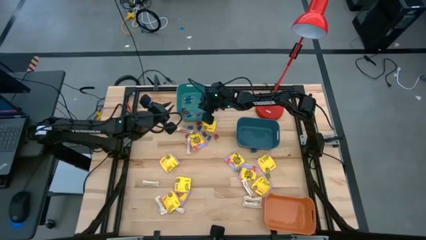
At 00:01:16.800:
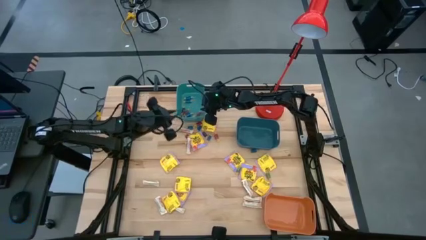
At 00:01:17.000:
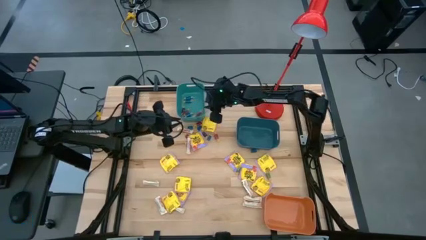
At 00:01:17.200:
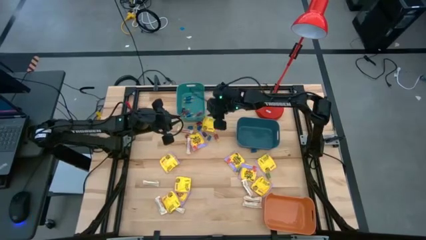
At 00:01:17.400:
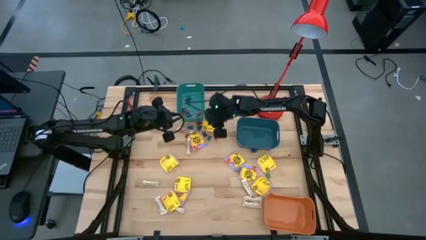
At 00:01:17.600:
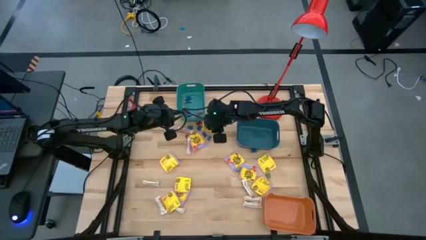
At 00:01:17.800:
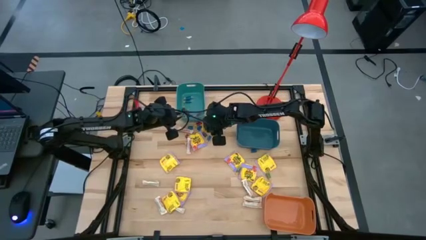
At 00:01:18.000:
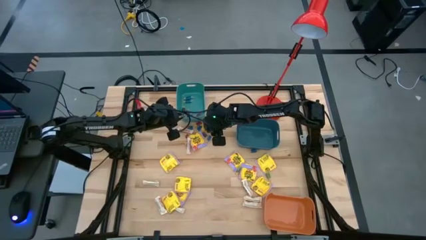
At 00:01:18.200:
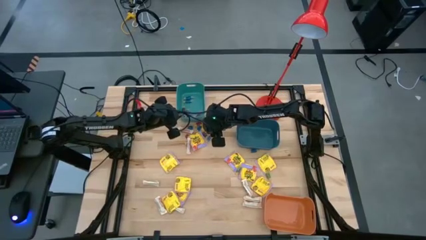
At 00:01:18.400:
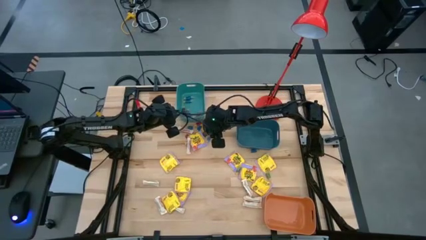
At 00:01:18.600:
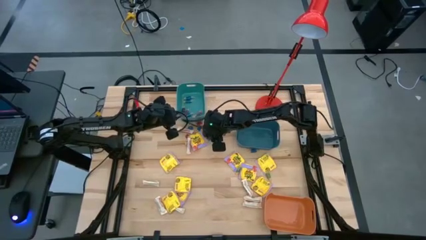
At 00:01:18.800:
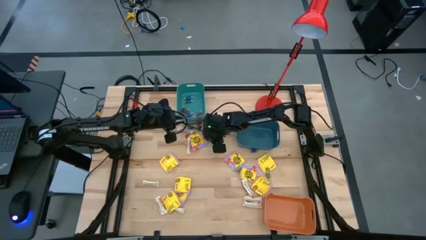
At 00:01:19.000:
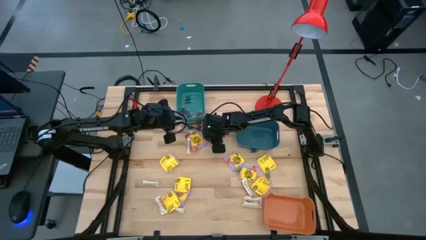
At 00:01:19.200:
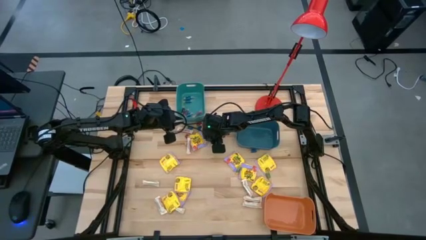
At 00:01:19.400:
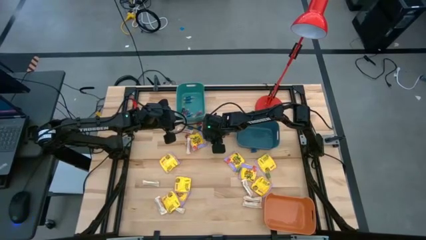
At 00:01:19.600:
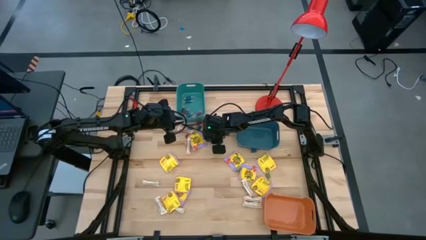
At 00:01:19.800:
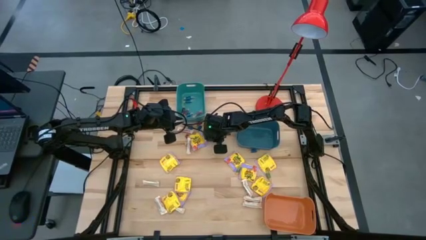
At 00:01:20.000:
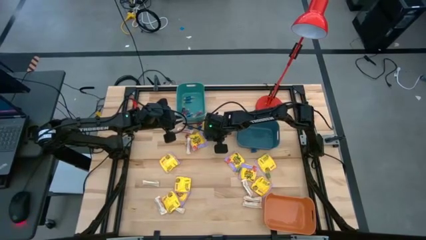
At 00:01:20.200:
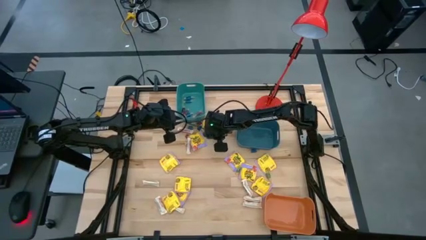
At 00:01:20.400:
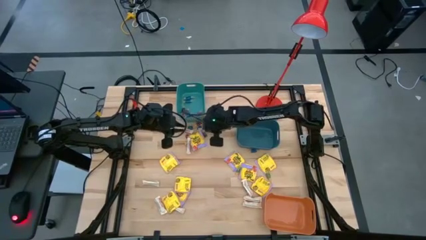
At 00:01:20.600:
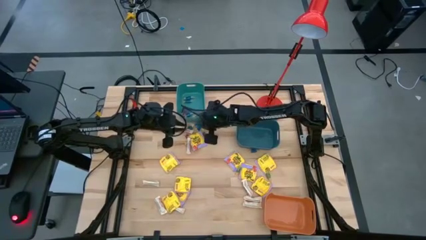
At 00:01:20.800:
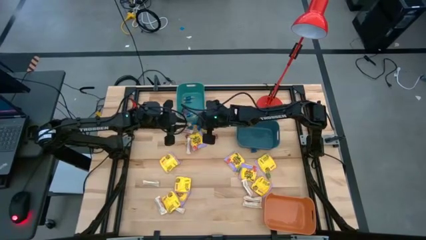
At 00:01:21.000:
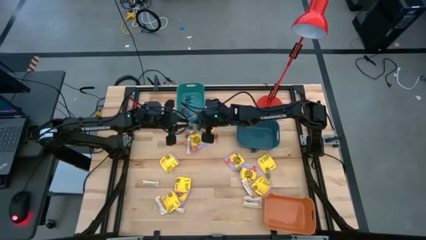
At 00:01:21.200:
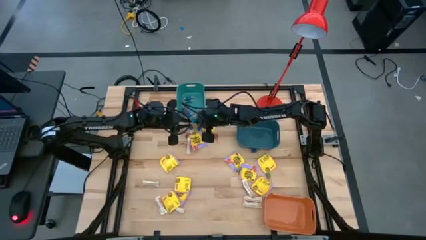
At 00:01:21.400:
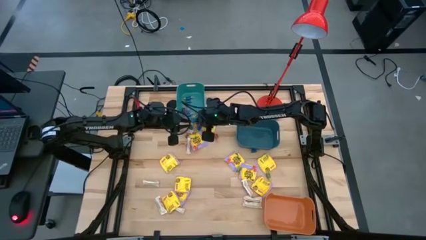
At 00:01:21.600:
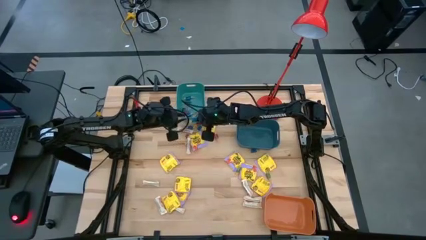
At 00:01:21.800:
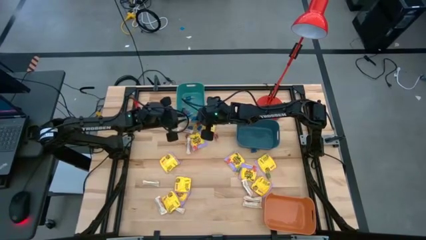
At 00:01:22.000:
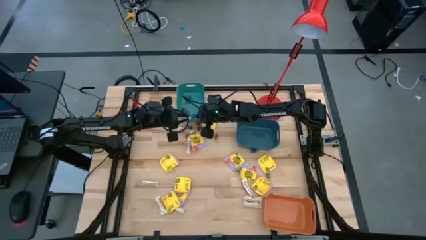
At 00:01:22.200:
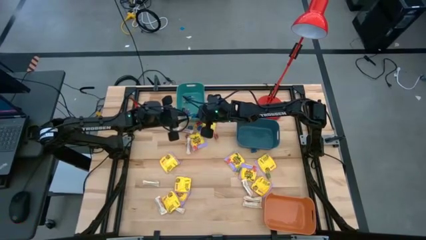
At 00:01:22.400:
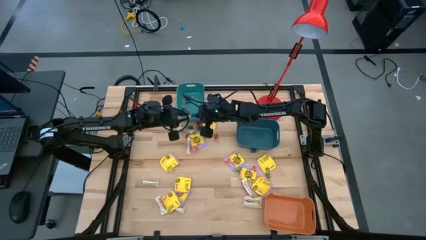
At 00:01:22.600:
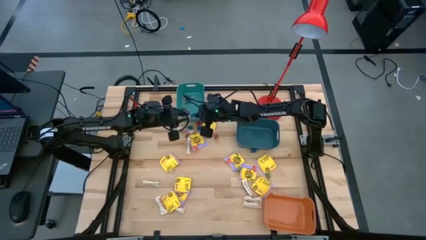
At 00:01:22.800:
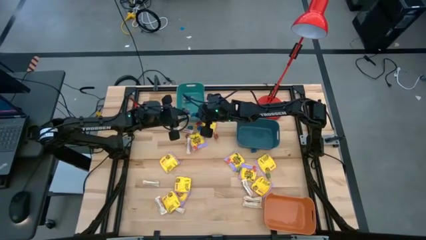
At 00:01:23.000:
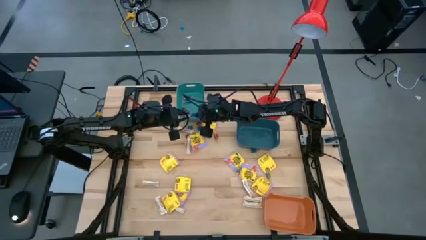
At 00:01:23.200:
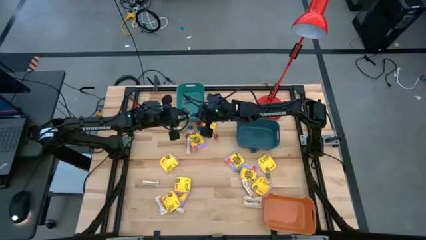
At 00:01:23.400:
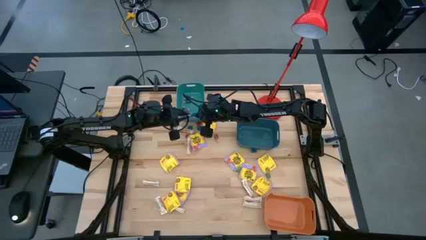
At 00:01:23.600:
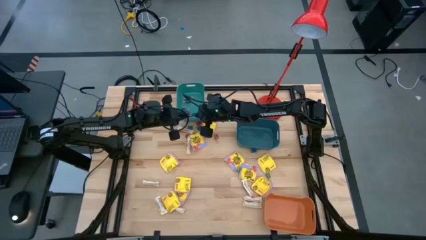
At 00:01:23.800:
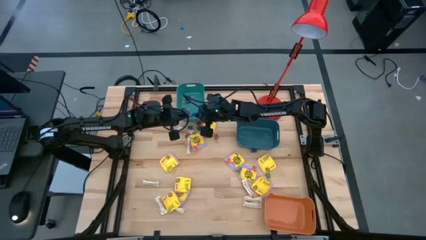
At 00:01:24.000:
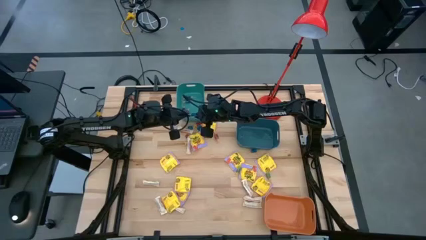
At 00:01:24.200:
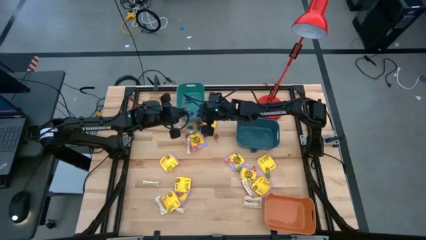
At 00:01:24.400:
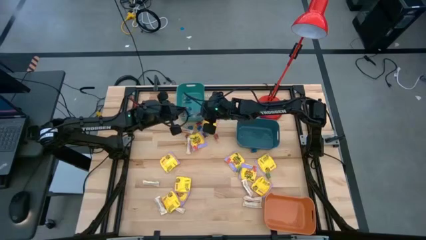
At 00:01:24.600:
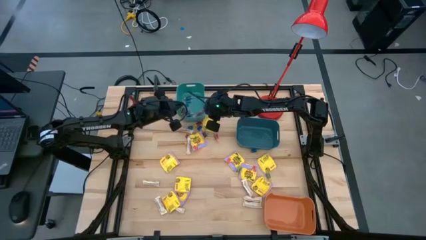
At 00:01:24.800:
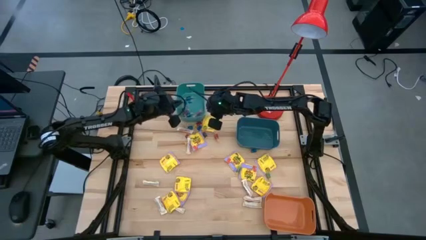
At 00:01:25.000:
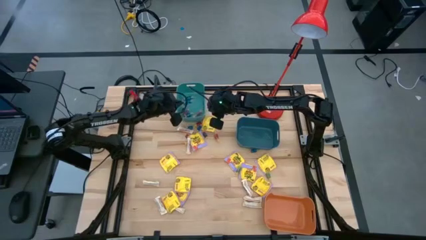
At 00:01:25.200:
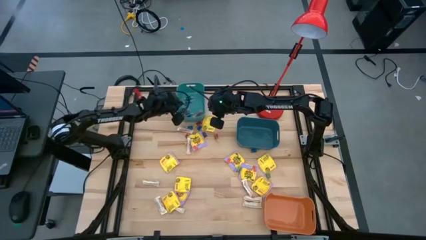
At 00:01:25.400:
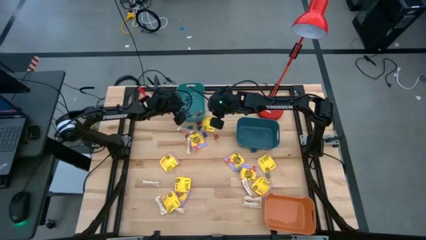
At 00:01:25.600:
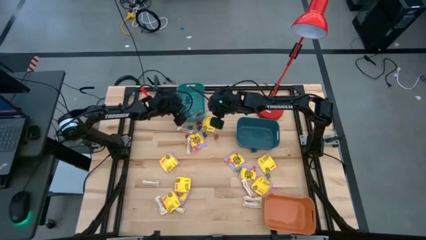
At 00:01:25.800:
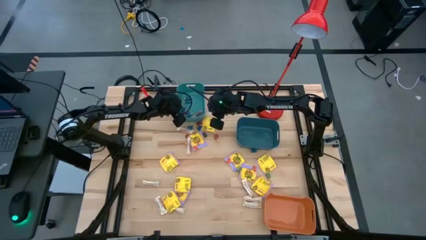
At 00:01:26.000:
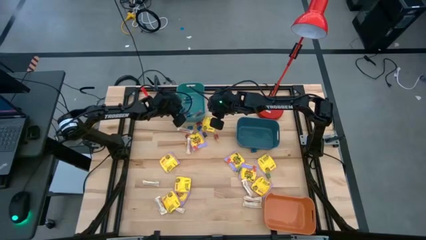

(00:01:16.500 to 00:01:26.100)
Task: Sort candy
Put the blue candy into the green bin
